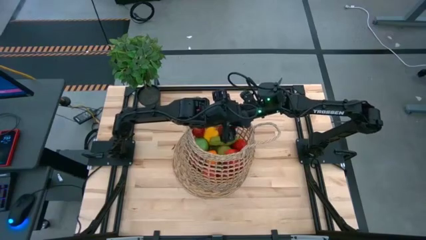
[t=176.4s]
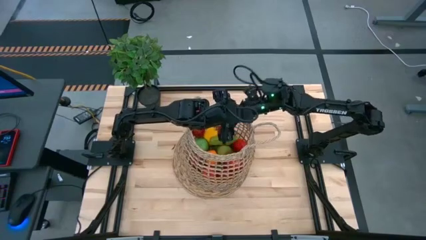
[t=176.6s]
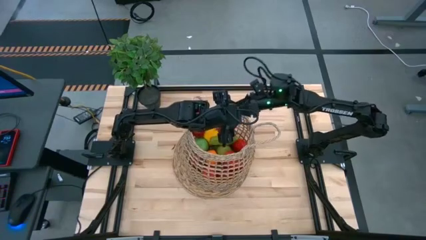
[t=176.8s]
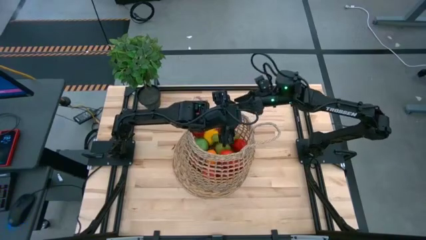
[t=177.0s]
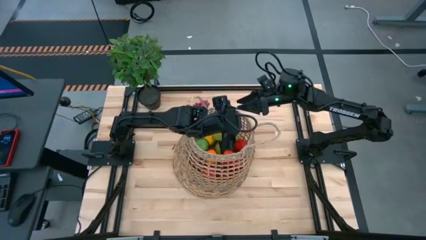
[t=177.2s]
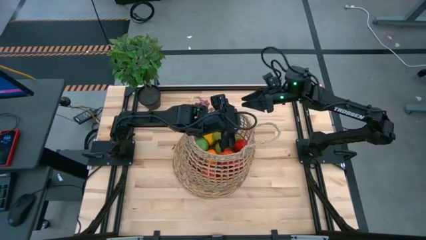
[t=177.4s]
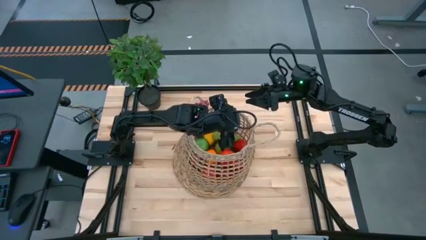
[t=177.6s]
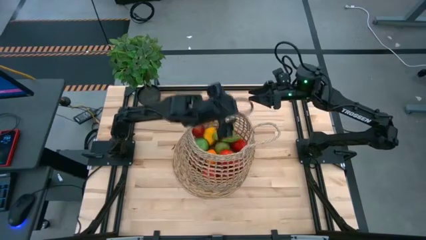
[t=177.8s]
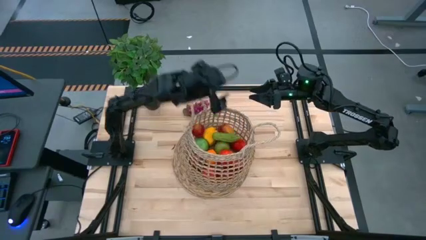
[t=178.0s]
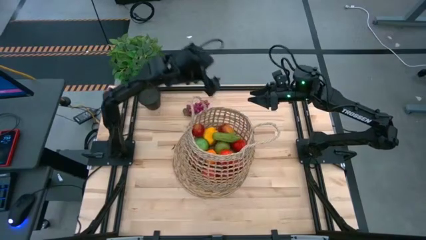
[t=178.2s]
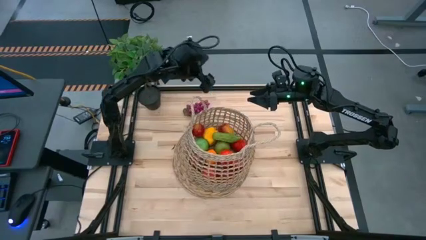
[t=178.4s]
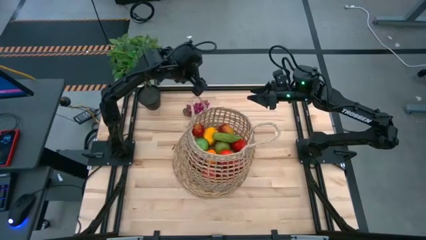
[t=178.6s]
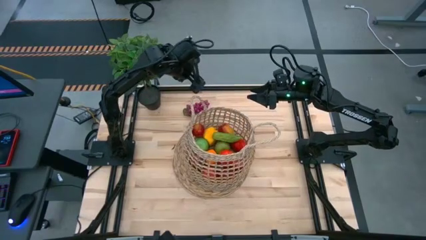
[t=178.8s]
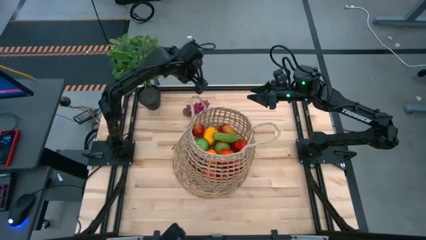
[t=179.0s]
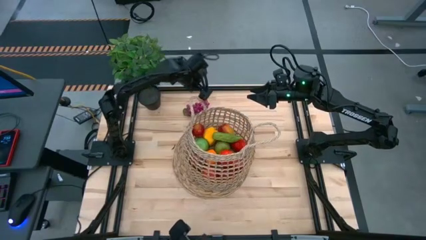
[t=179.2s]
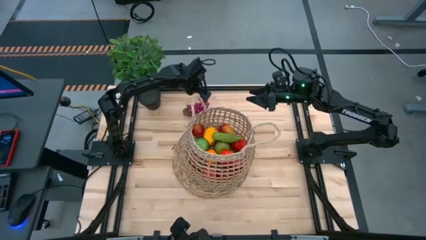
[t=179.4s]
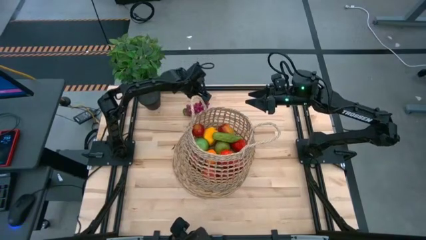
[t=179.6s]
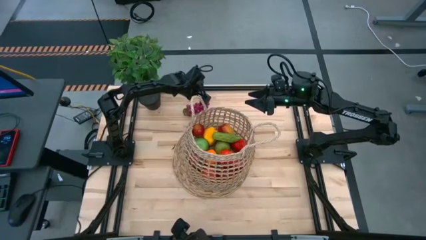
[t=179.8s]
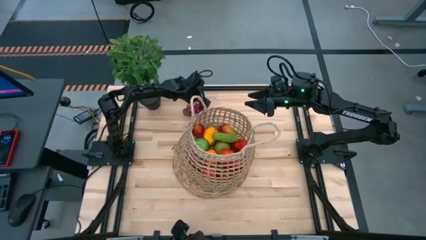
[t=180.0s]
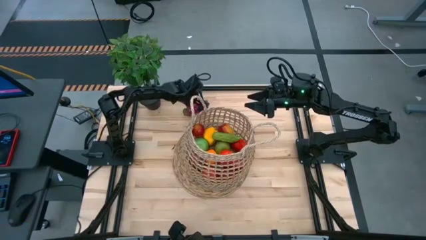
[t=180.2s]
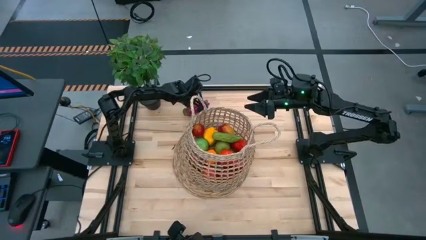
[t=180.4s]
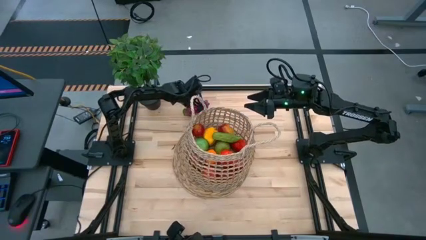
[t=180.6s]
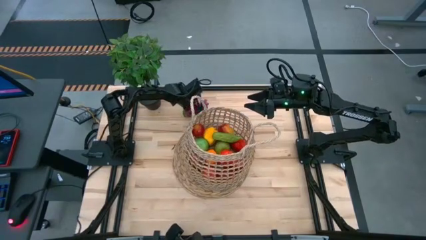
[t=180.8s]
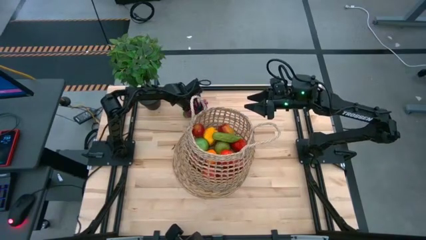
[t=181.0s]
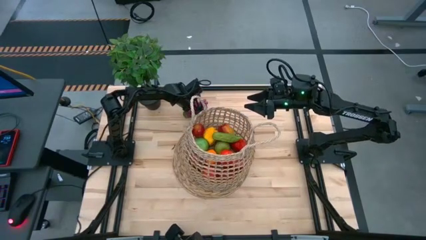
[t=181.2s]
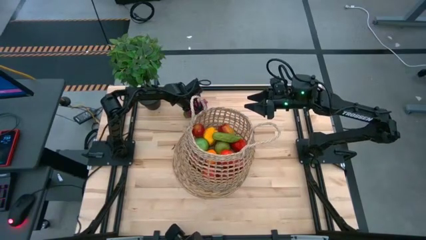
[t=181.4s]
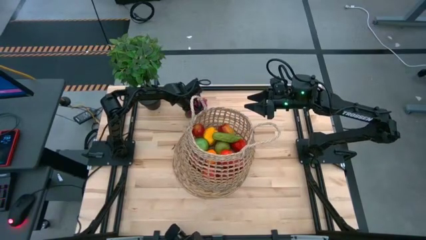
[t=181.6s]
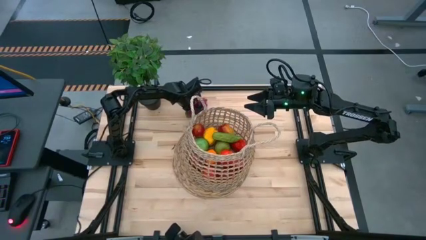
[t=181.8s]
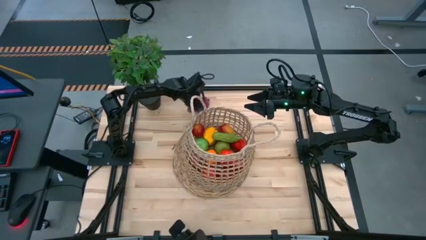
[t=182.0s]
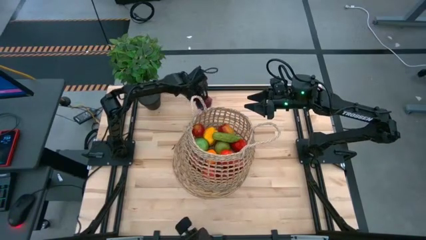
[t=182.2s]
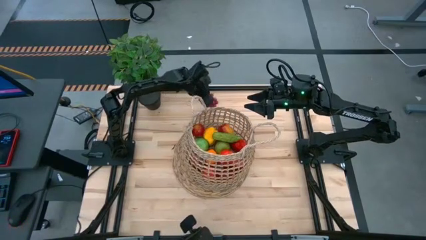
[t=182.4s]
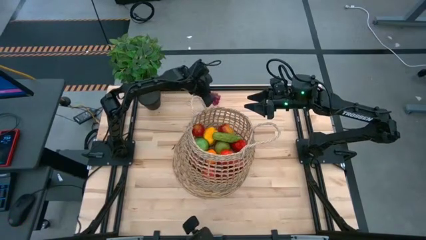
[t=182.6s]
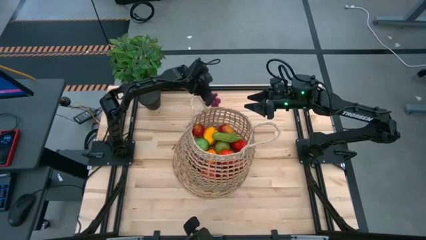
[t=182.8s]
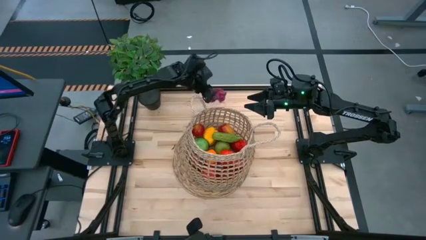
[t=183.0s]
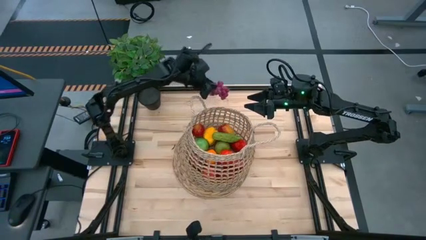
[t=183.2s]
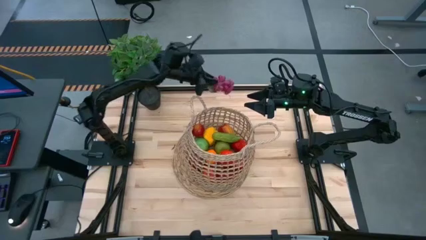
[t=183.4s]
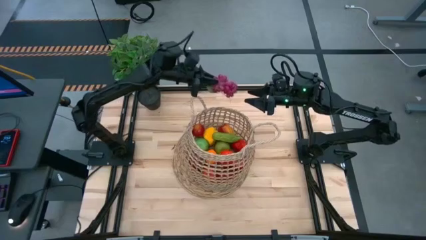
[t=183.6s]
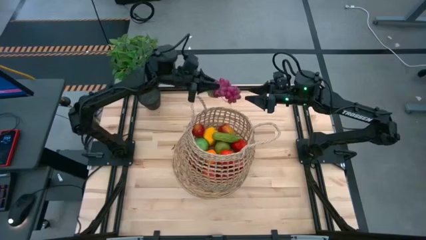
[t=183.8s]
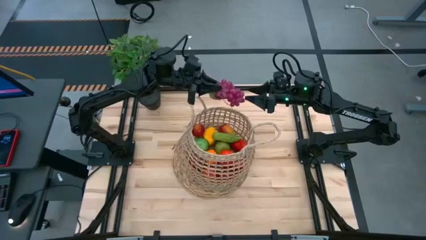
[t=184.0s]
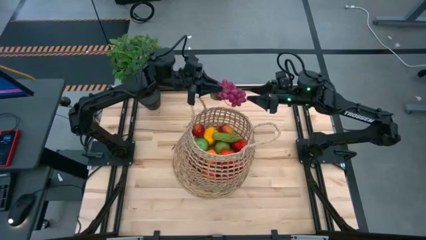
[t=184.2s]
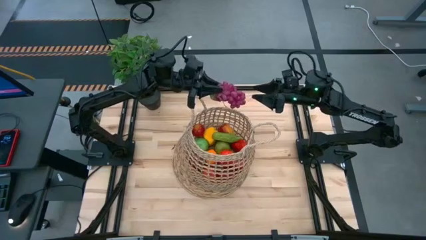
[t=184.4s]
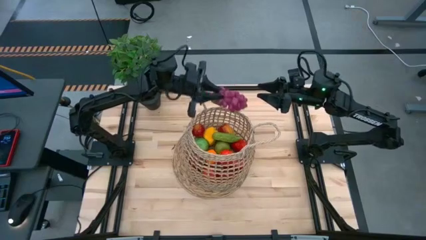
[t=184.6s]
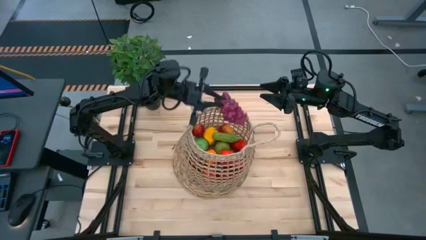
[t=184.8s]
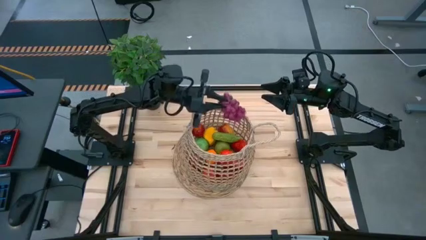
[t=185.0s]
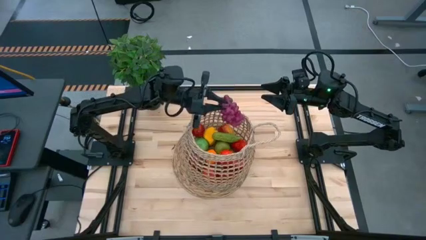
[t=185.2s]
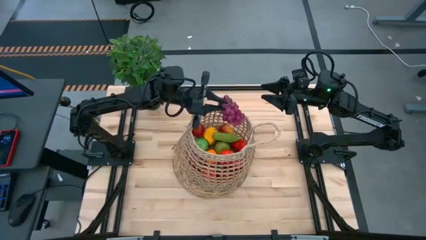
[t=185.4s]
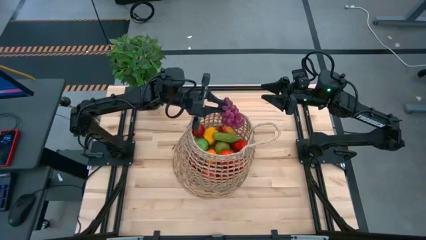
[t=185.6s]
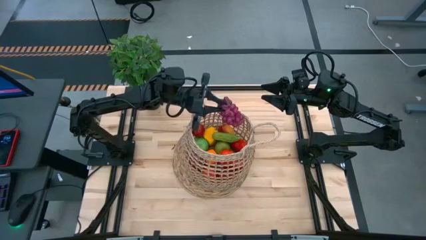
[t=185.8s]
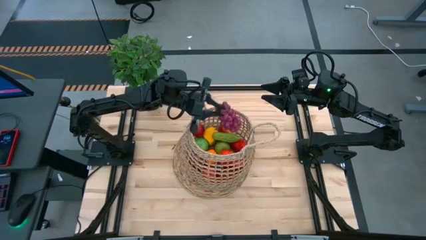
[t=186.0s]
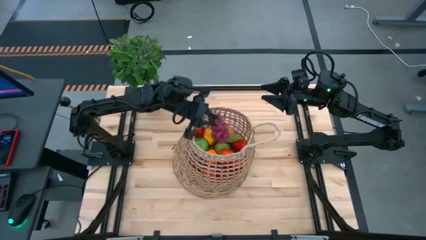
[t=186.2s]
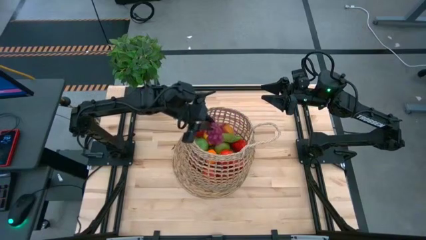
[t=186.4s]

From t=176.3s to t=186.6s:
Task: Build produce basket
Put the red grapes into the brown basket

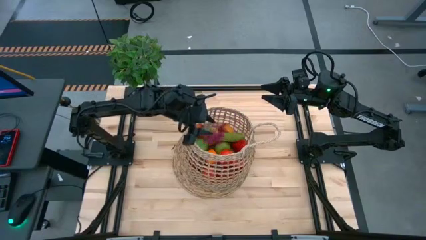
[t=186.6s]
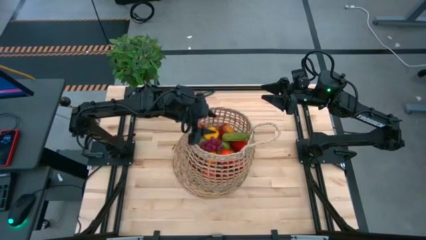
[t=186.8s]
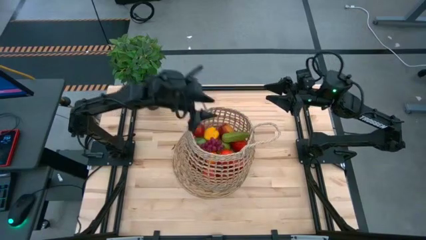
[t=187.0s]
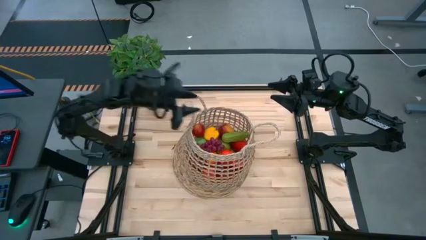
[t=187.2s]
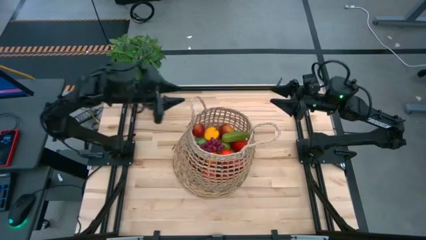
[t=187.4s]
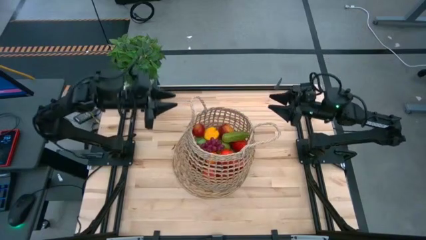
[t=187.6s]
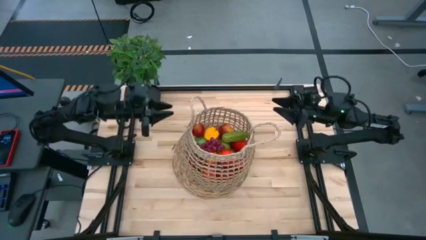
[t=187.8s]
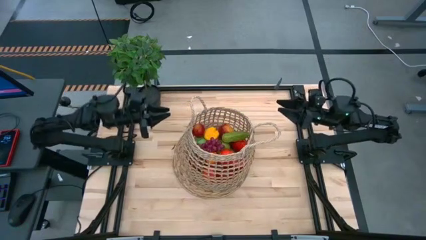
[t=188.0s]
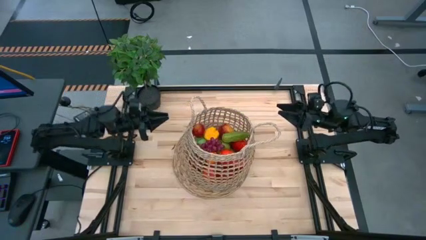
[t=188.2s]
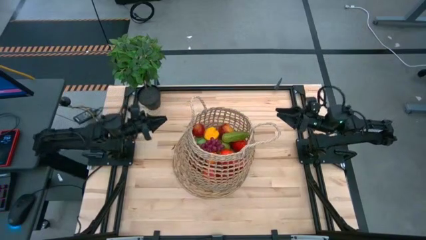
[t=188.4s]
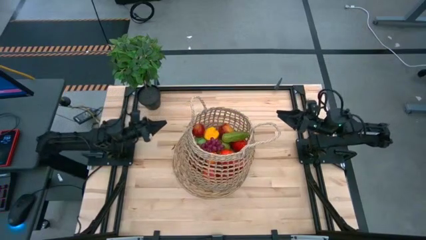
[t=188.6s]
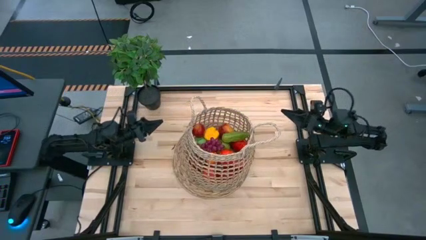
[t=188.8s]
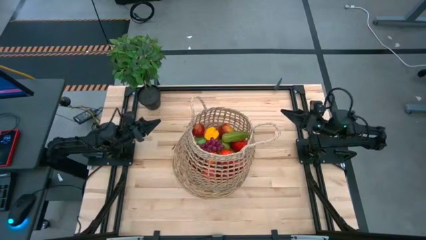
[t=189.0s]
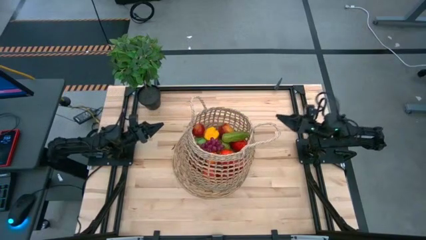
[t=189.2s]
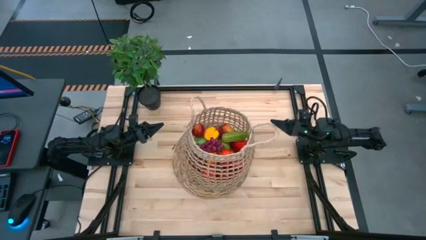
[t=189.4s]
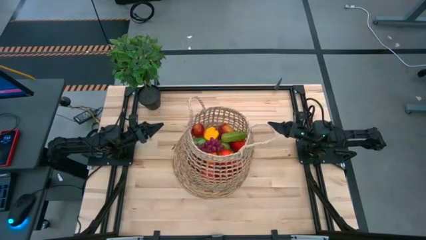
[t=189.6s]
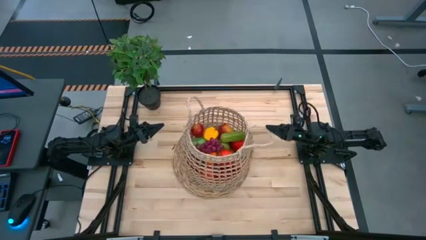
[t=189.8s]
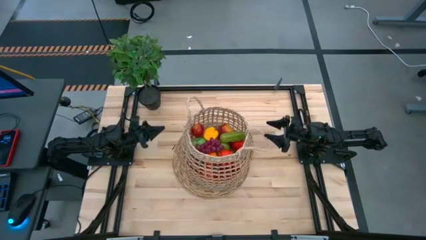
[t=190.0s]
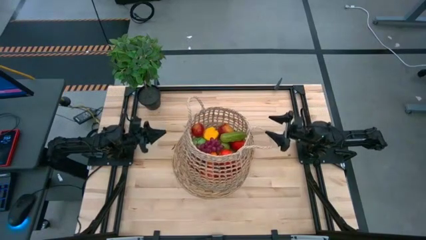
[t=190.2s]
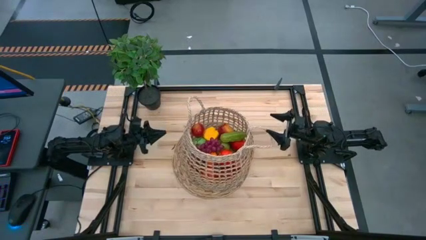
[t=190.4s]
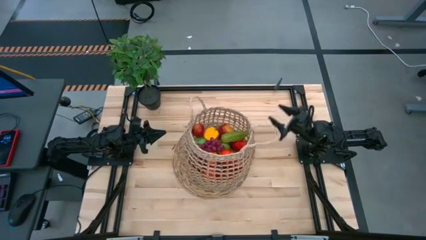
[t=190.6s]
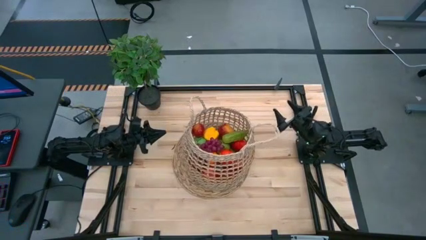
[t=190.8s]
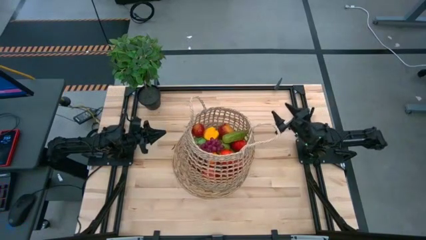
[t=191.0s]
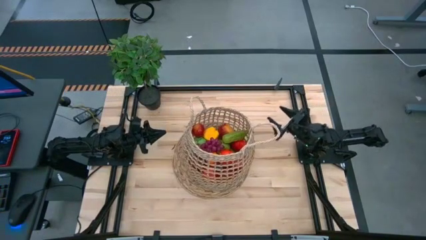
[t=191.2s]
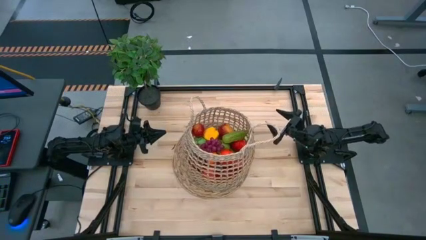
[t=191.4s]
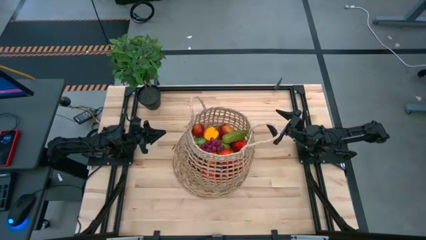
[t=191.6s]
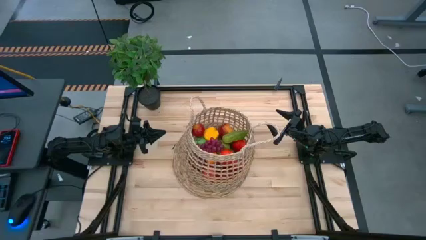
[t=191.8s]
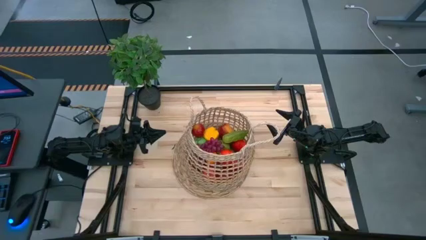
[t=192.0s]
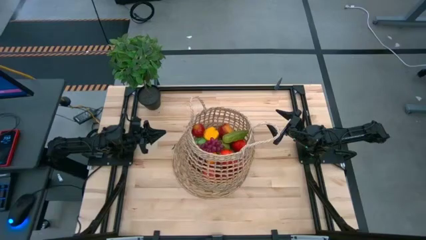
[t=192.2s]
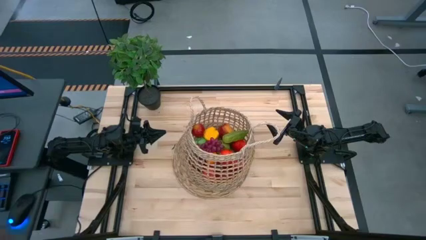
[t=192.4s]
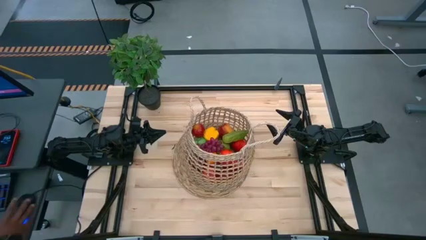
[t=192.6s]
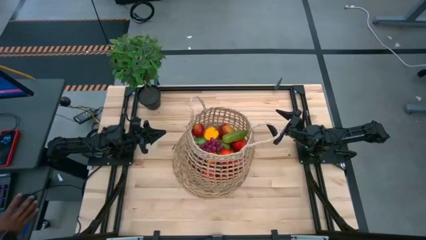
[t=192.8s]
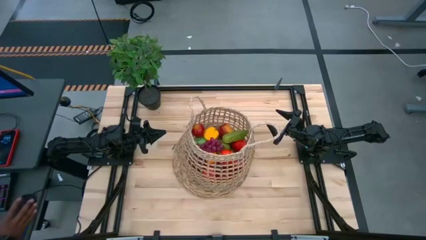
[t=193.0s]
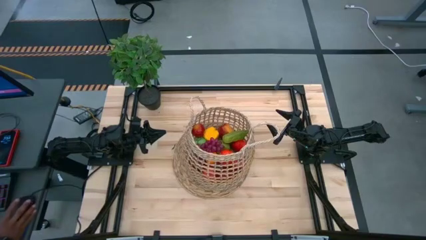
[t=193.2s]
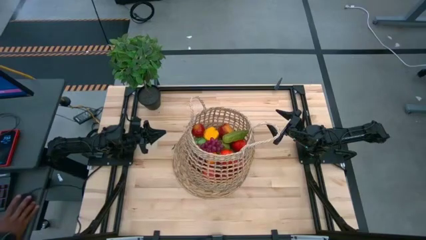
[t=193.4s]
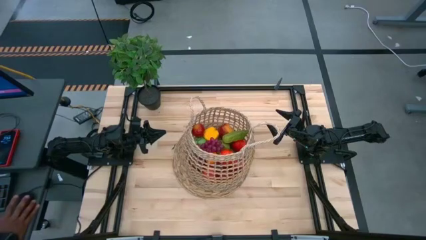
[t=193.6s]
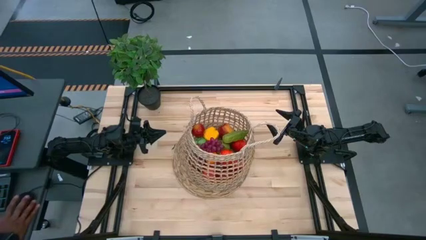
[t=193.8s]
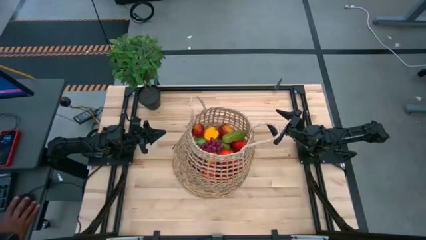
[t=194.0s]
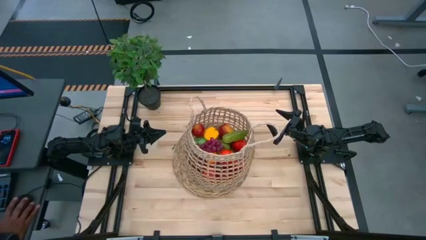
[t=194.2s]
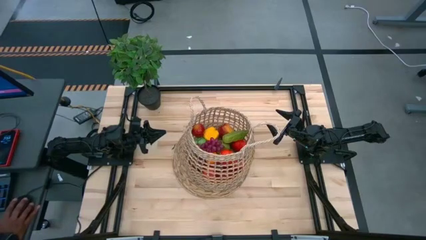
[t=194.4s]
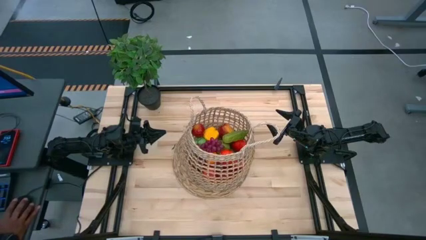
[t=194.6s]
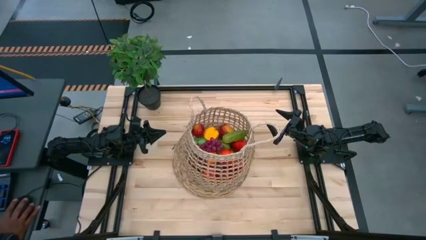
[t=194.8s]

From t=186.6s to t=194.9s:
Return to Home Position
